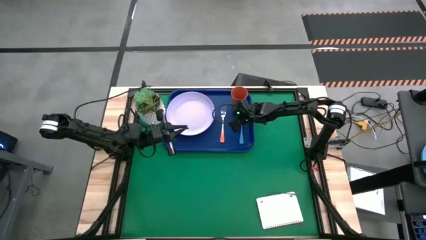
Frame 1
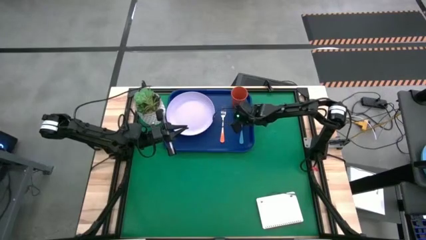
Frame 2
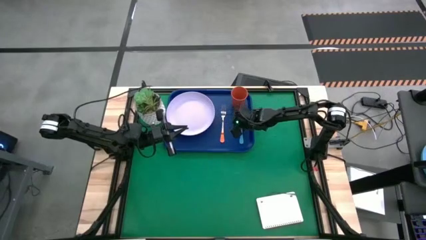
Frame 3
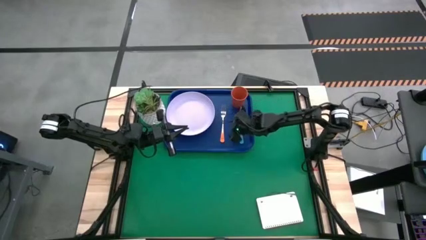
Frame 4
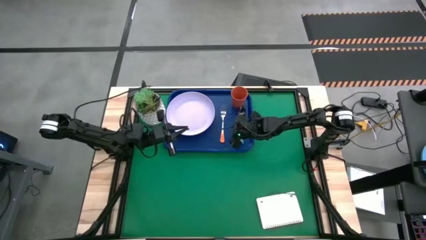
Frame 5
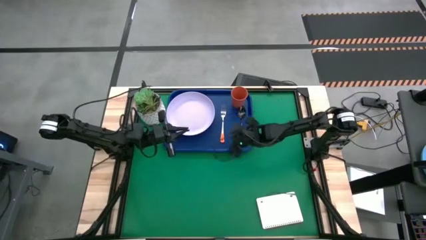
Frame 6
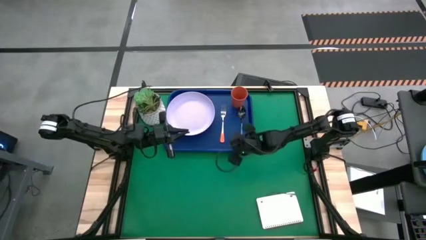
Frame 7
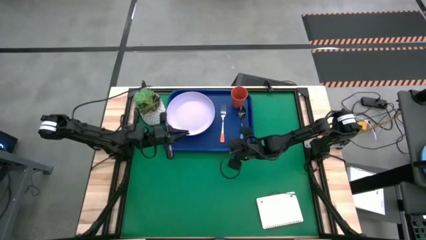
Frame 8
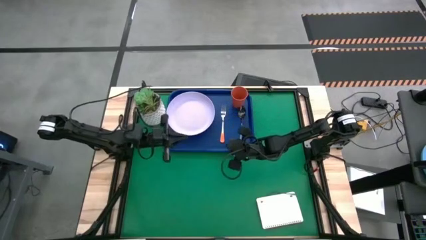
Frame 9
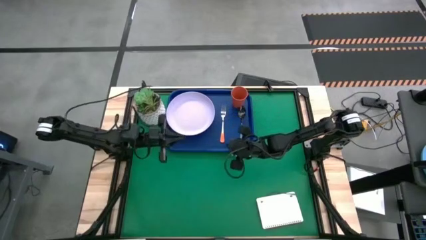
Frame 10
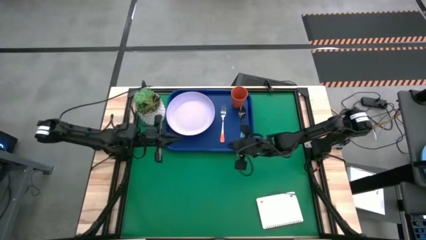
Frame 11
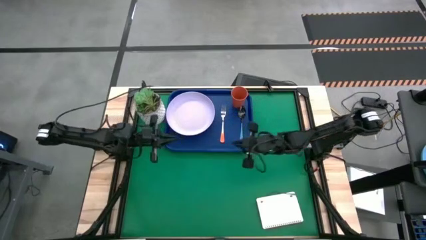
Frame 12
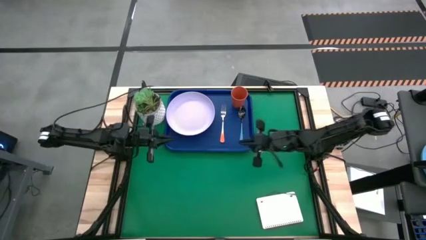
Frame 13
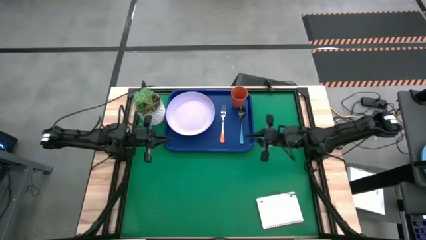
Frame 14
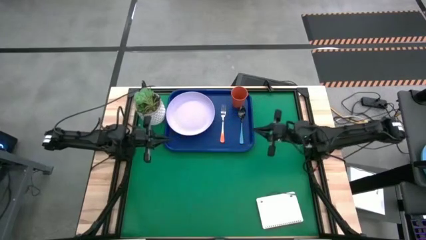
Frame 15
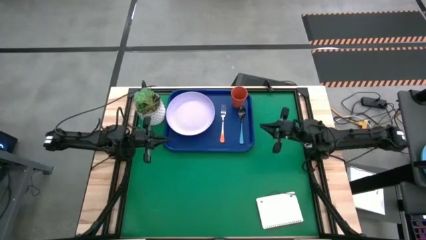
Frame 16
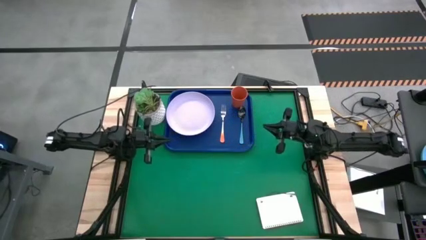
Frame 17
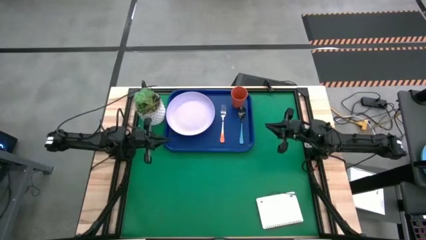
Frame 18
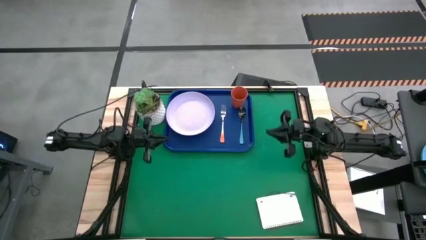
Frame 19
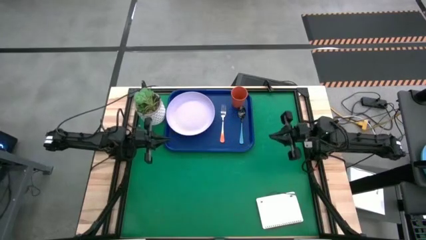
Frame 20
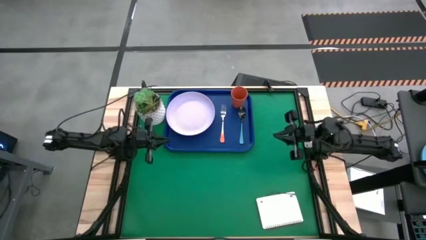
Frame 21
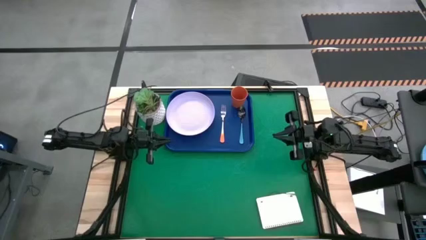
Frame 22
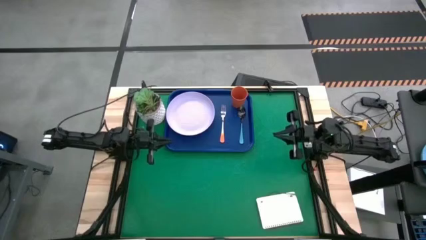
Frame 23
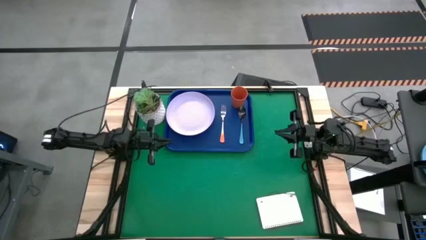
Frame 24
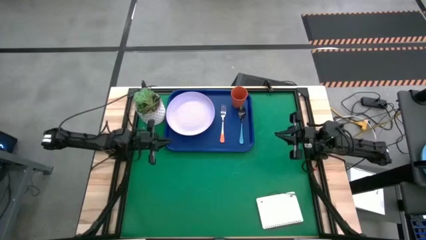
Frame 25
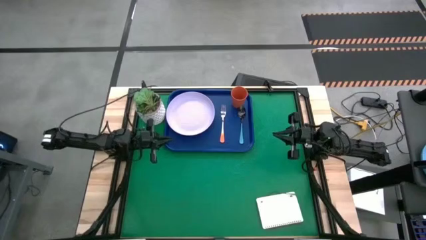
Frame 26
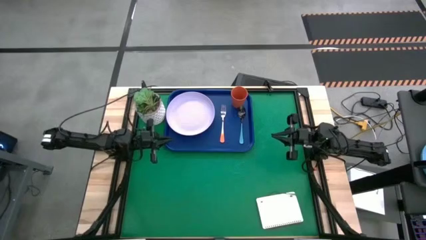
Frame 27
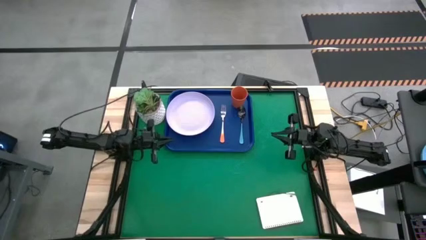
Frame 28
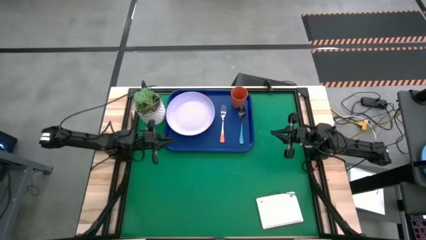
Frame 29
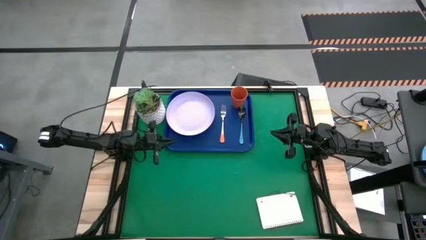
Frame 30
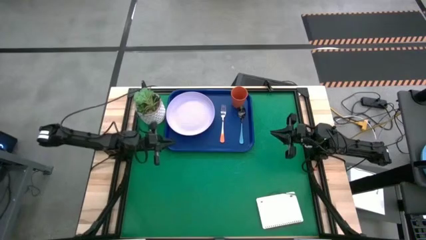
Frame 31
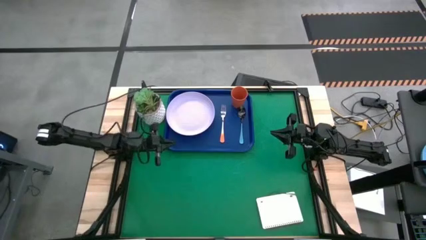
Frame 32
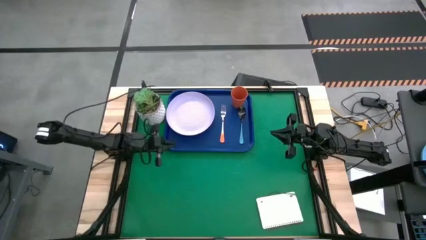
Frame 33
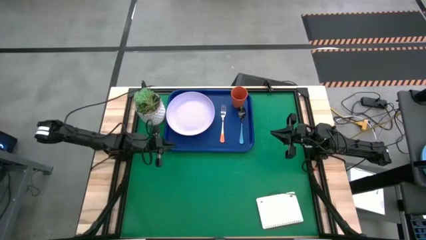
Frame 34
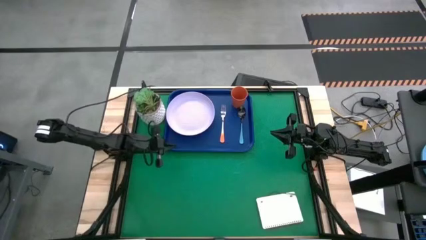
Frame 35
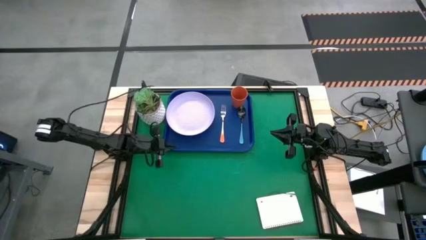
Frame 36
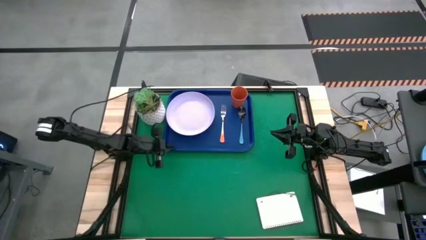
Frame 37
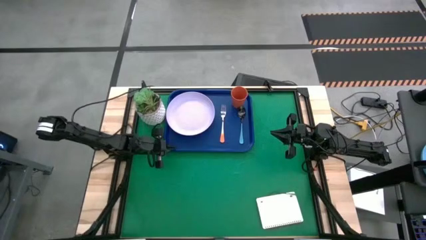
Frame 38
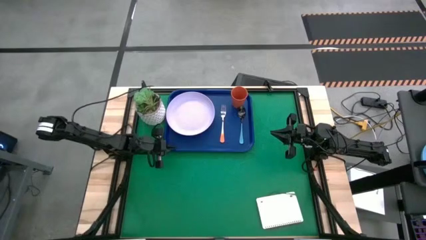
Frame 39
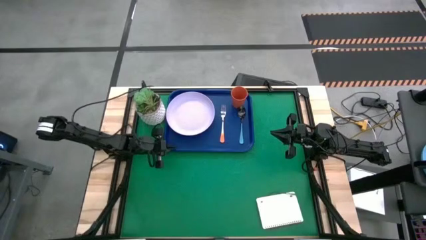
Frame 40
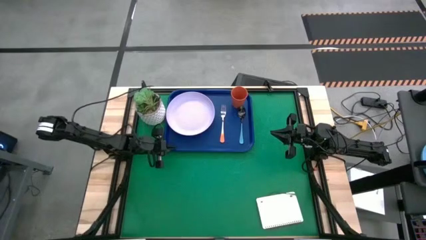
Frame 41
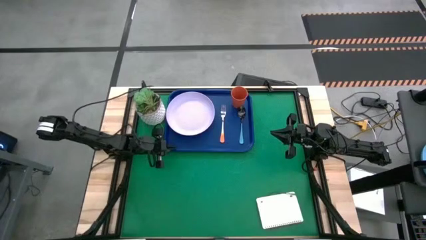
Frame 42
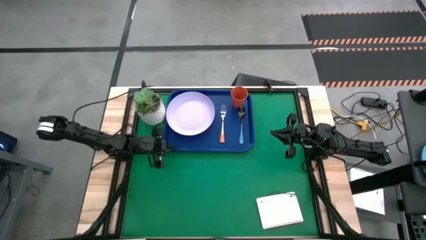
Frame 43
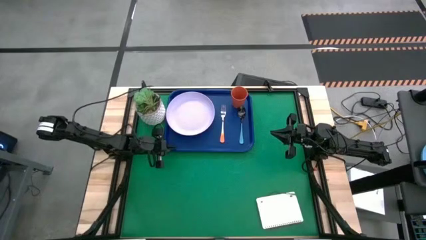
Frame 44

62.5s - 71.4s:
Task: Pick and place plate/cup/fork/spoon on tray
Return to Home Position

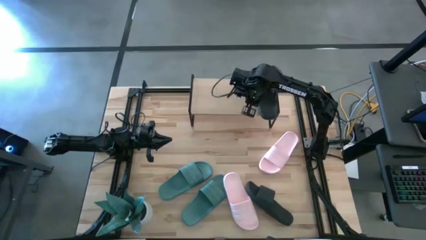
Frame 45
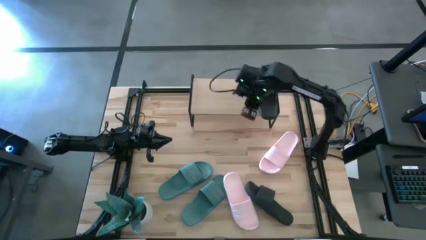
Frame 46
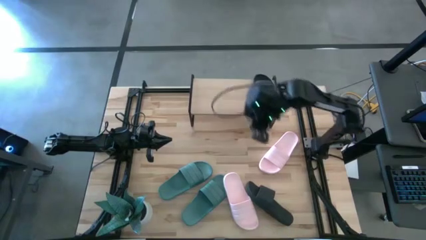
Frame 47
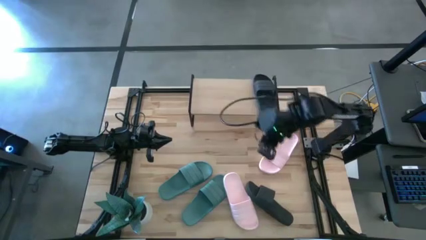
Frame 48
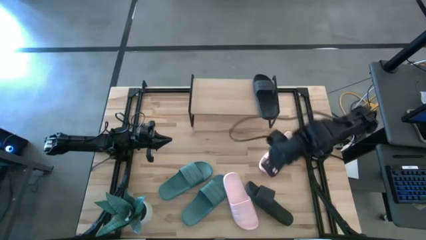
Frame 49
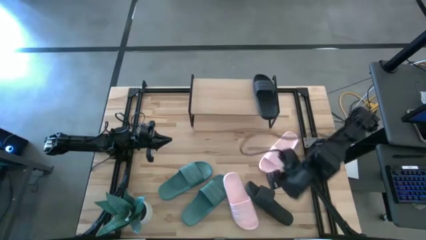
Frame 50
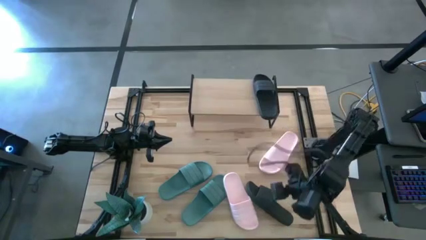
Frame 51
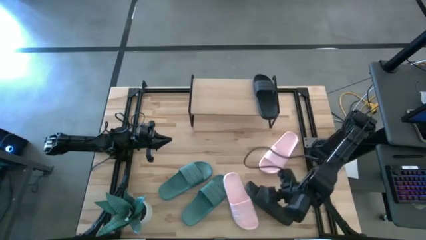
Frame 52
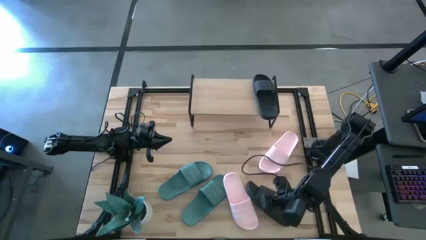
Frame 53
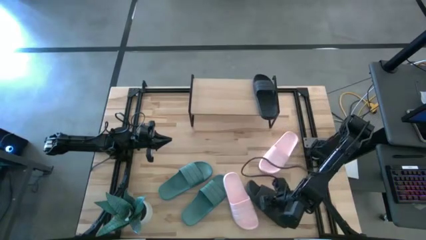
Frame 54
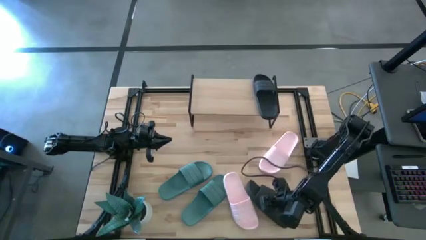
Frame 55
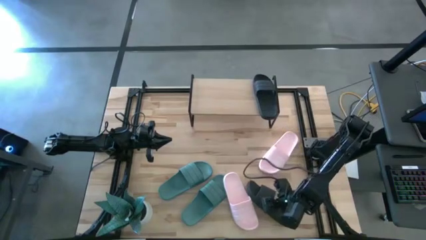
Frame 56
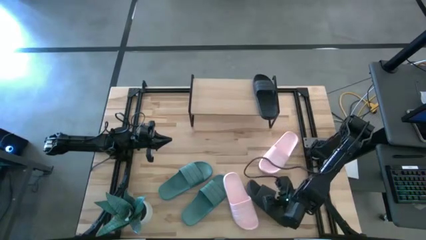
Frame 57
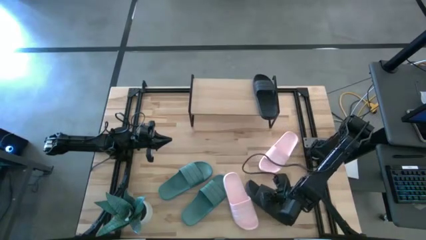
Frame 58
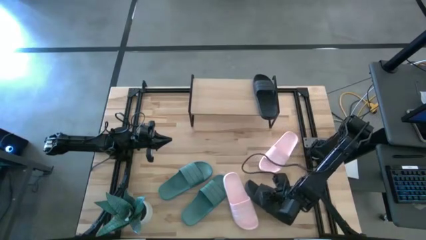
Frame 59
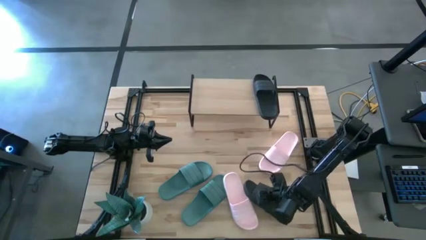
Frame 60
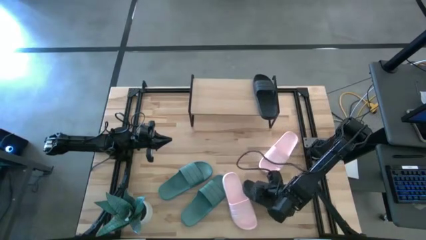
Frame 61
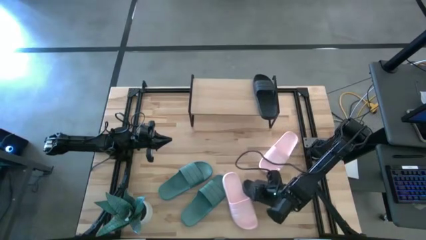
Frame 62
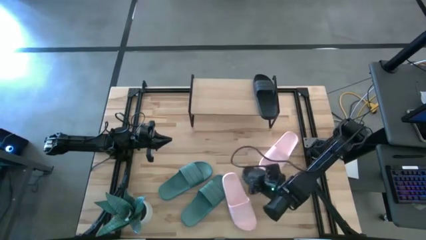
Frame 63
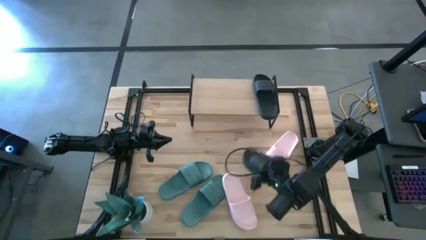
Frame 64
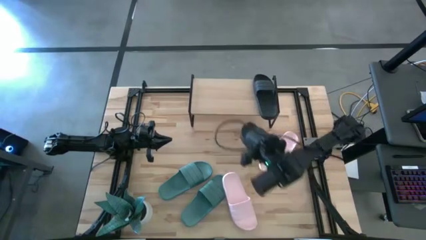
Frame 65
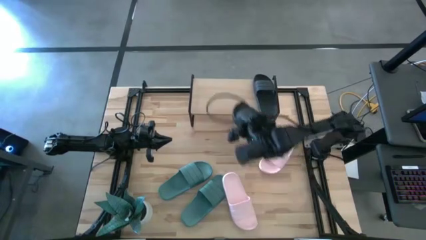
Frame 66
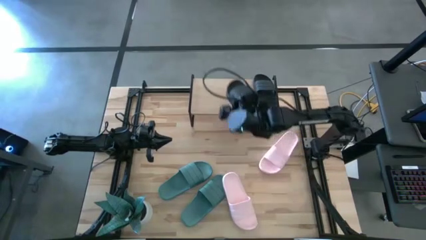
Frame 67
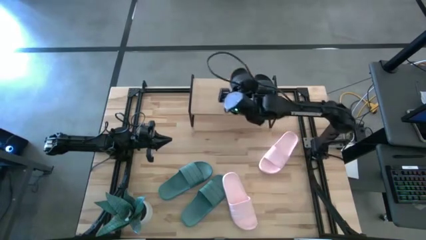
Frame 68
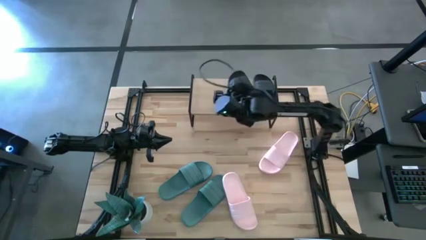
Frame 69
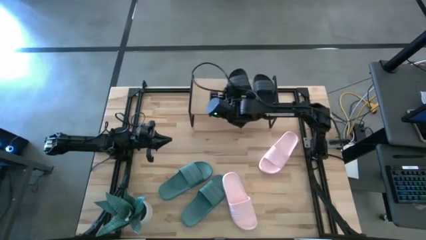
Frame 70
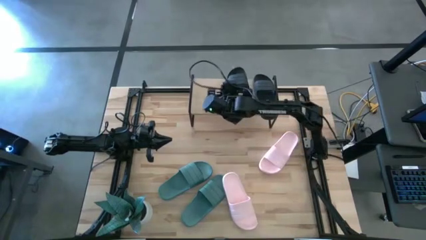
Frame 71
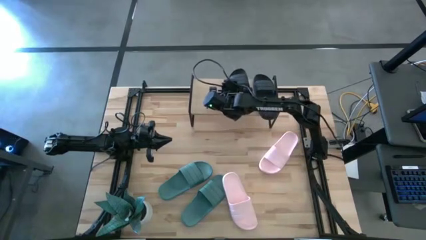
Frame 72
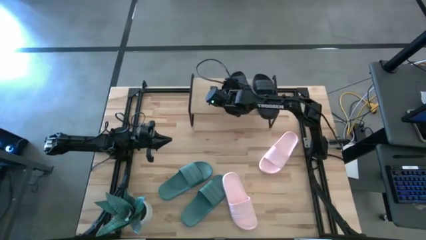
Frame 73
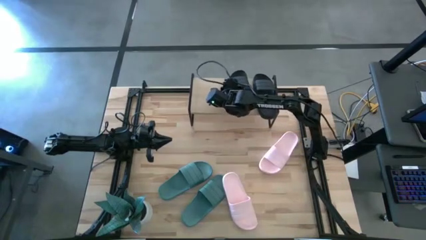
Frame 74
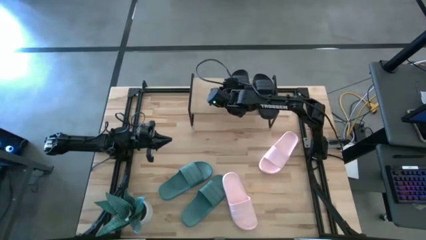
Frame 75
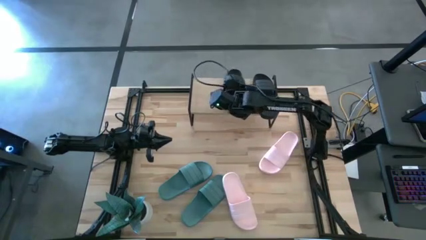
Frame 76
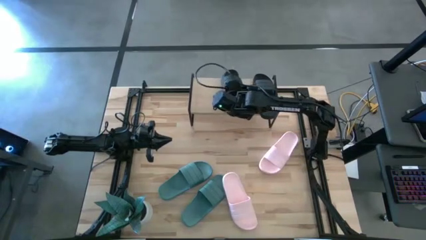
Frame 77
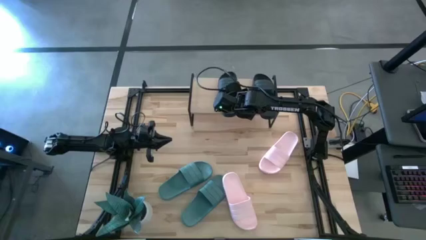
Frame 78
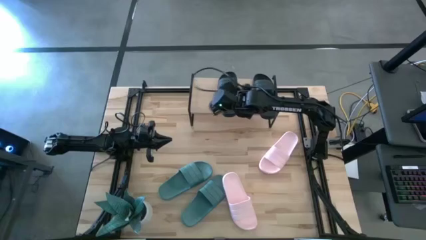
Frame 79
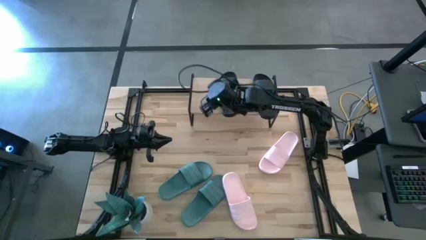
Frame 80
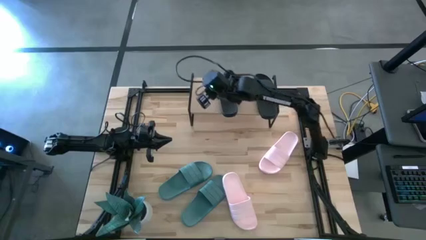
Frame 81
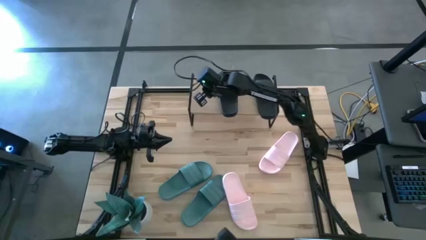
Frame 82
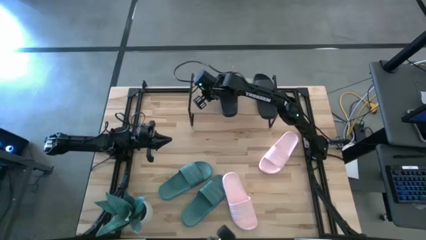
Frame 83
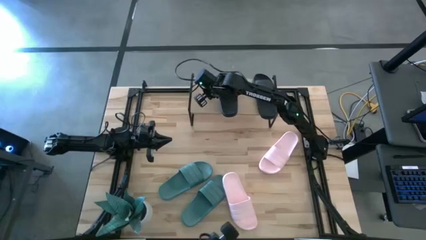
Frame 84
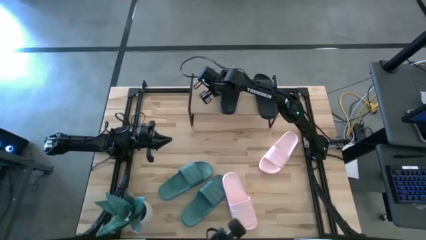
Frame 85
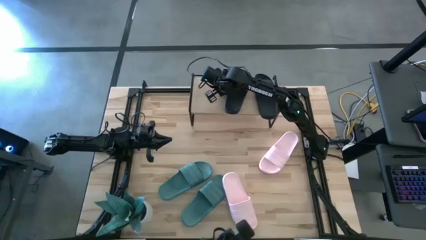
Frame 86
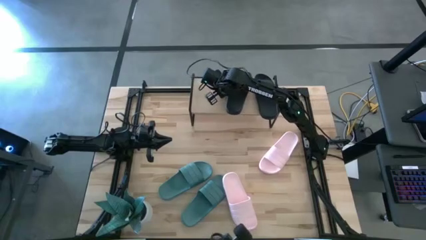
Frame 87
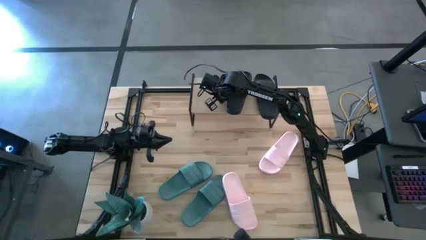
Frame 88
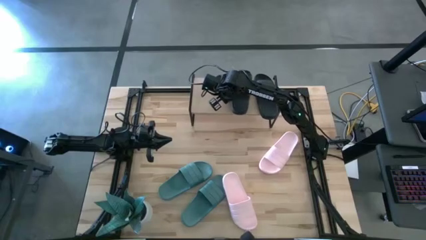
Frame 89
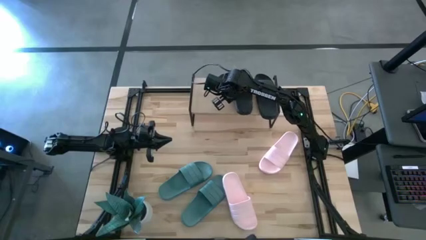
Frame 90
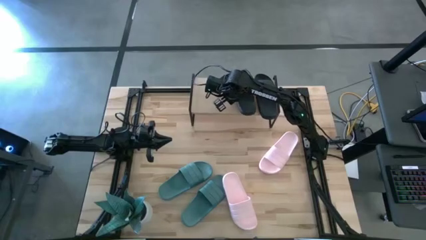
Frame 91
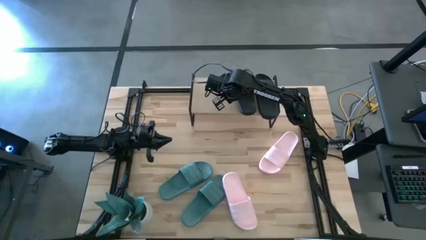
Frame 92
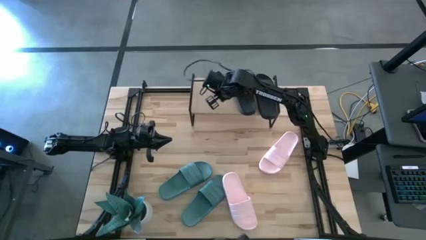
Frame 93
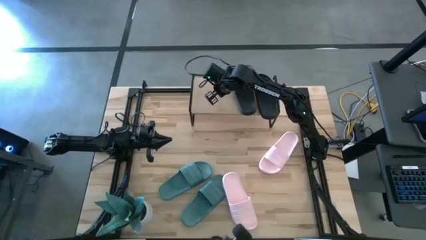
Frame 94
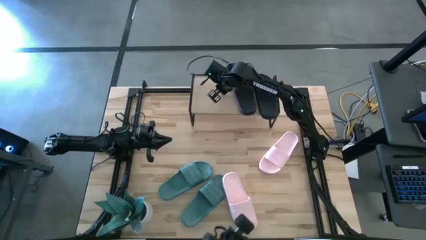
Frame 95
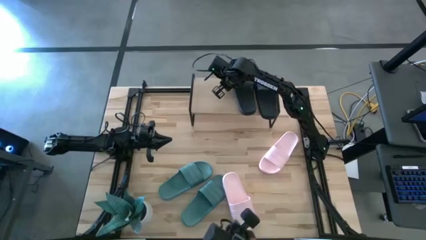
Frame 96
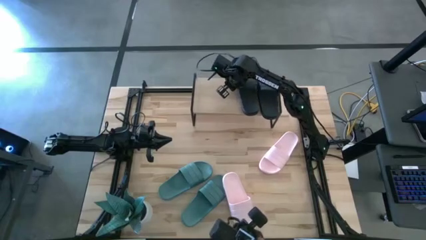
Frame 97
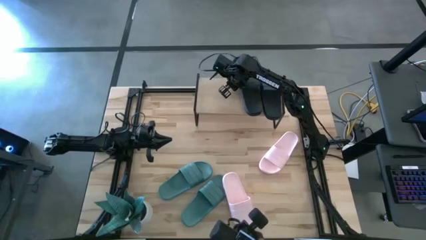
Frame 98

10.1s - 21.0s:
Task: Pick and place slides into the shelf
Put the black slipper onto the shelf
